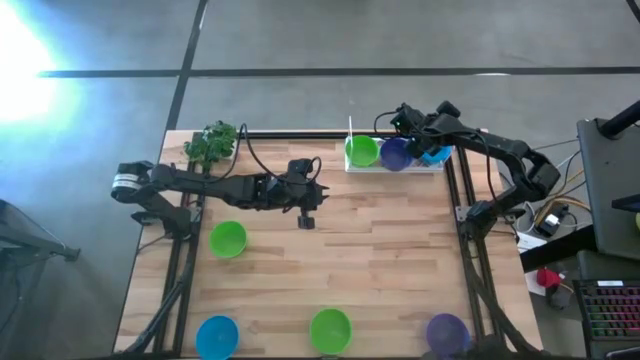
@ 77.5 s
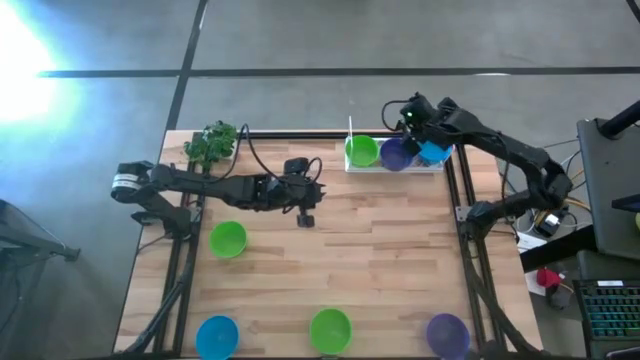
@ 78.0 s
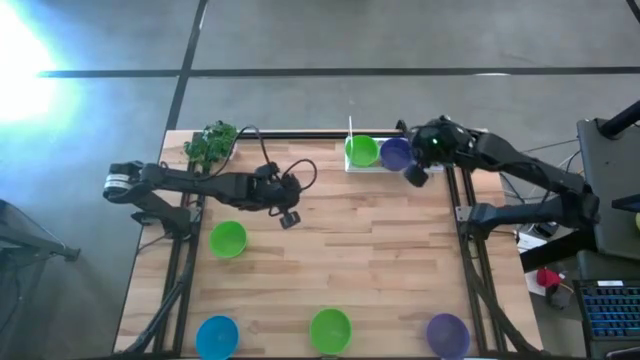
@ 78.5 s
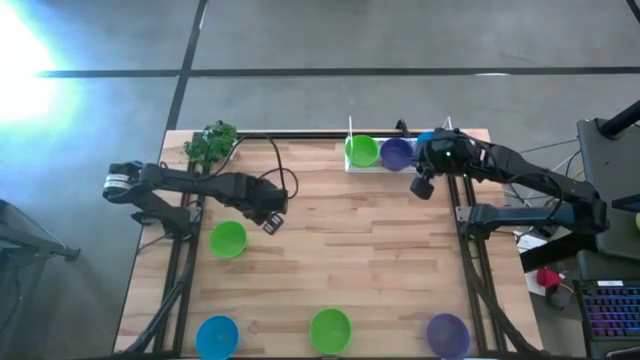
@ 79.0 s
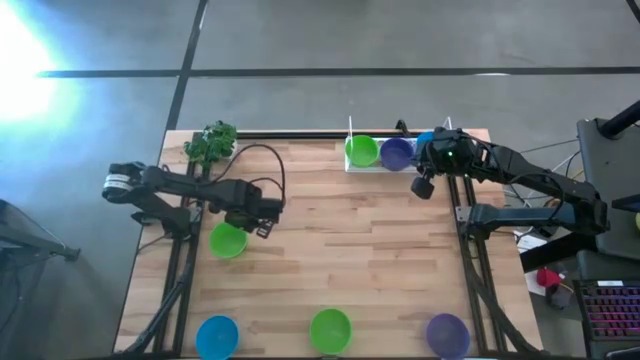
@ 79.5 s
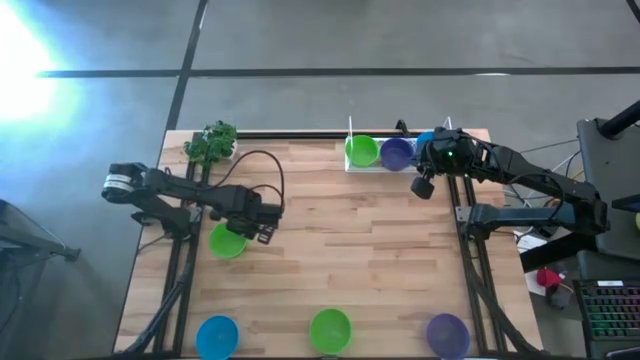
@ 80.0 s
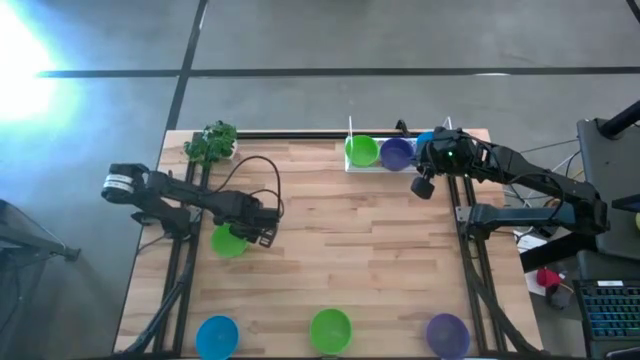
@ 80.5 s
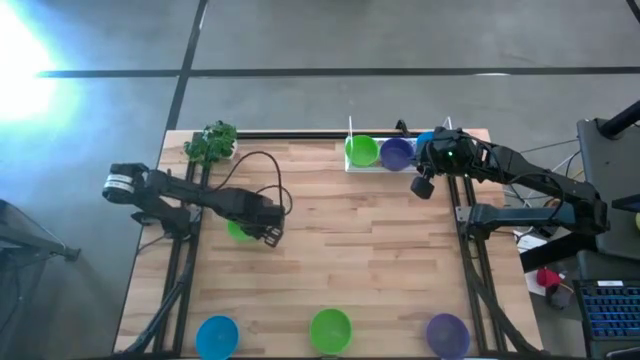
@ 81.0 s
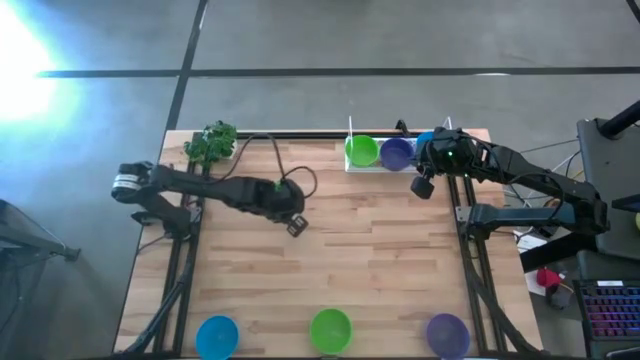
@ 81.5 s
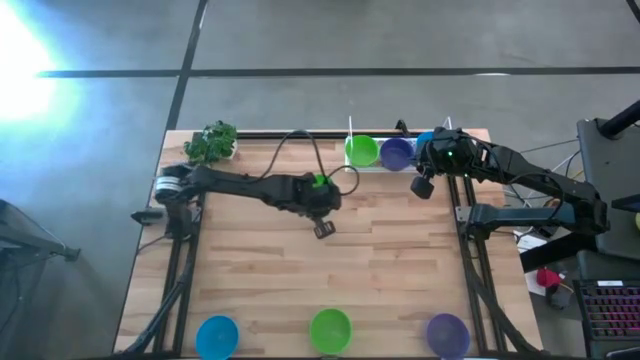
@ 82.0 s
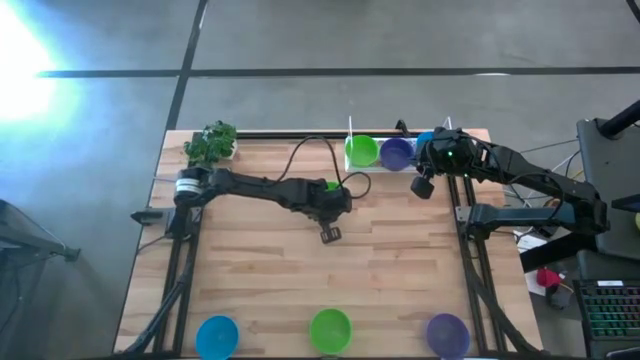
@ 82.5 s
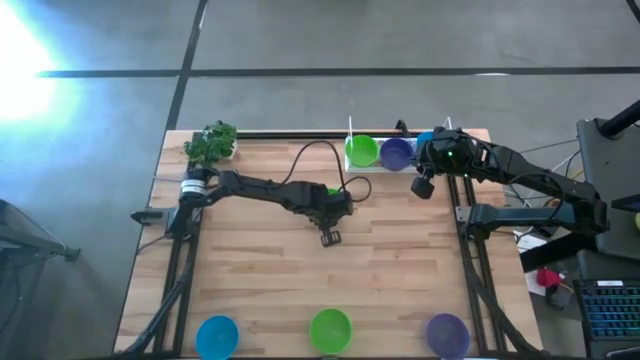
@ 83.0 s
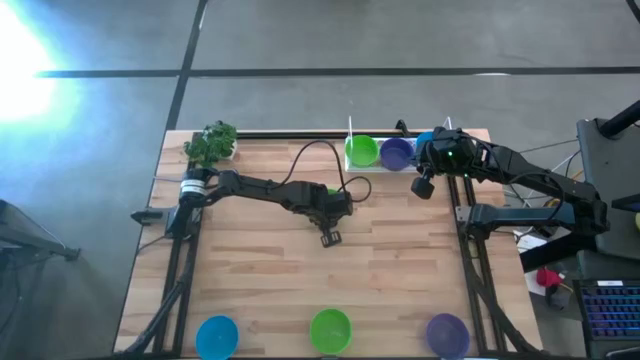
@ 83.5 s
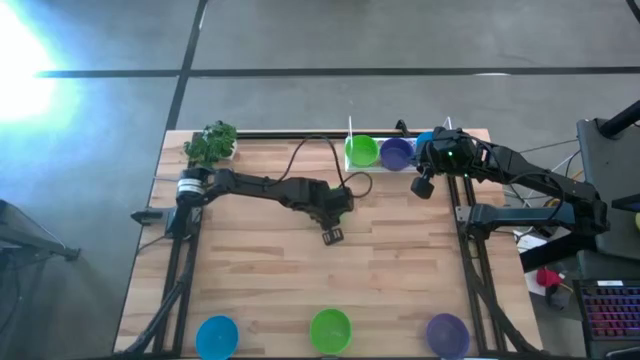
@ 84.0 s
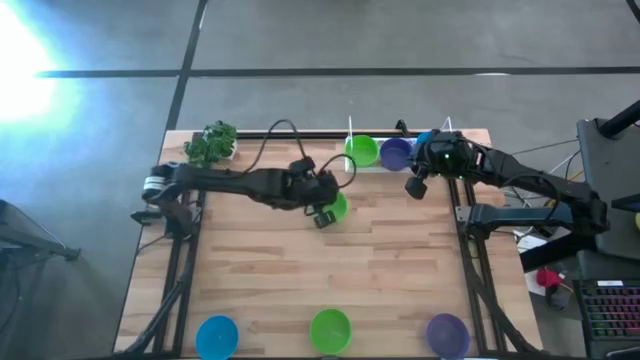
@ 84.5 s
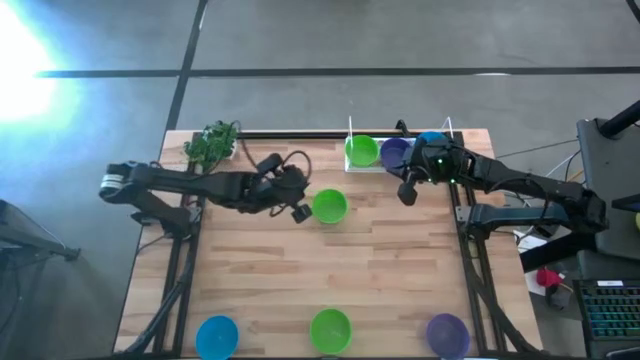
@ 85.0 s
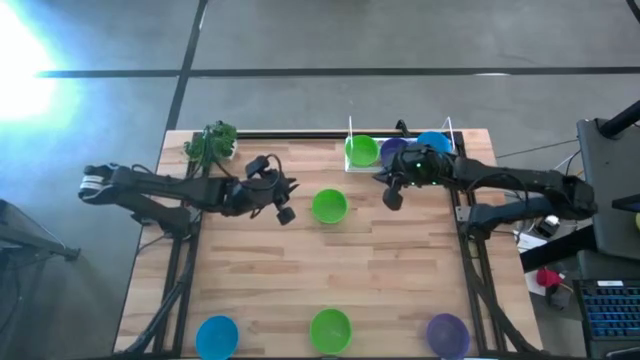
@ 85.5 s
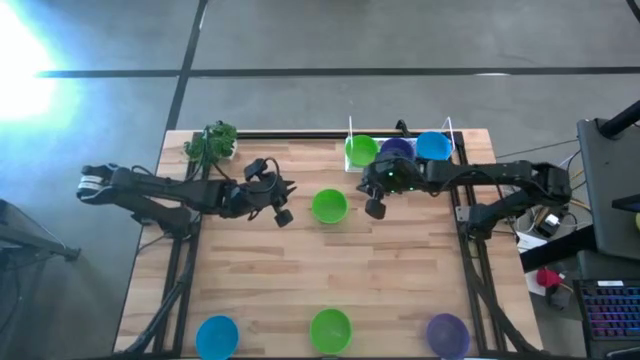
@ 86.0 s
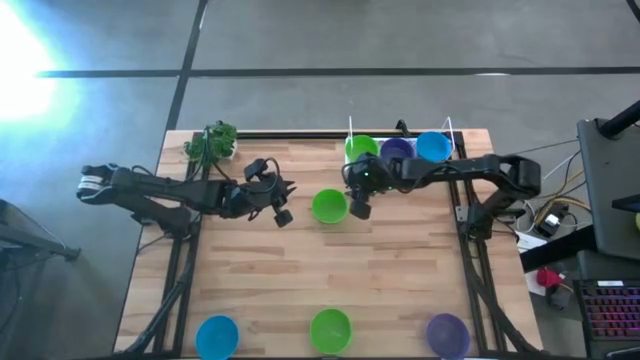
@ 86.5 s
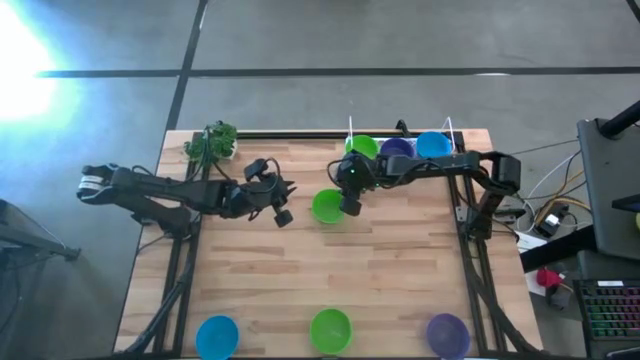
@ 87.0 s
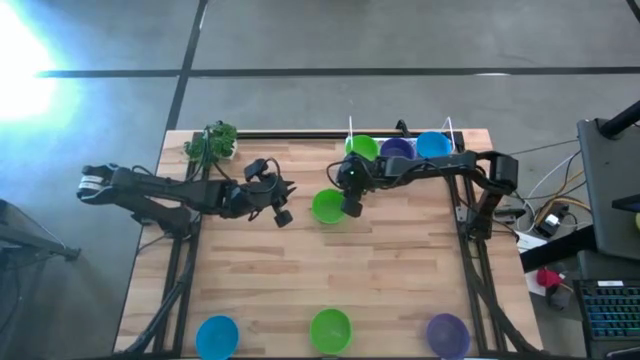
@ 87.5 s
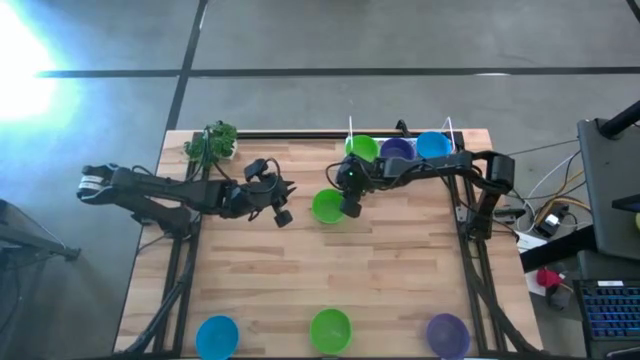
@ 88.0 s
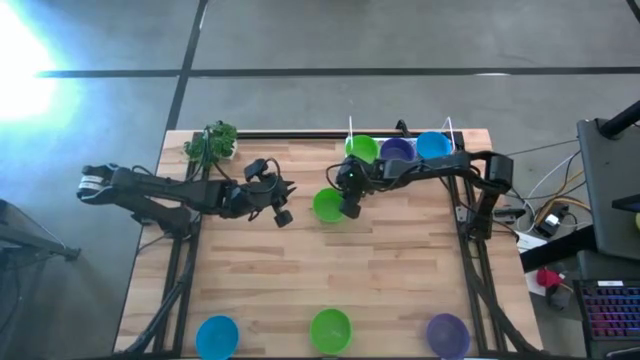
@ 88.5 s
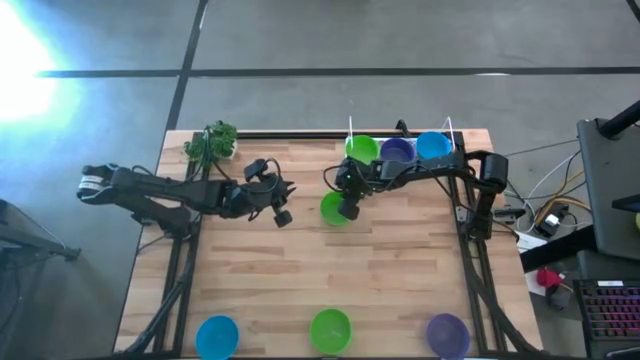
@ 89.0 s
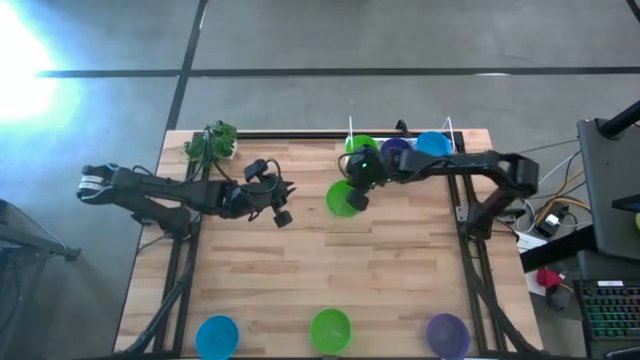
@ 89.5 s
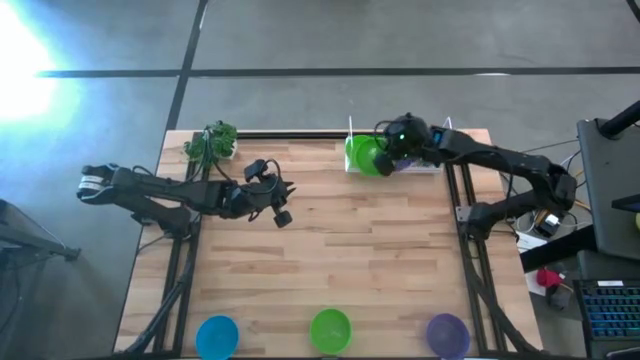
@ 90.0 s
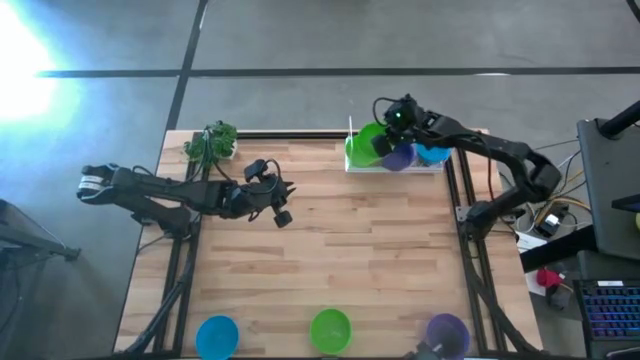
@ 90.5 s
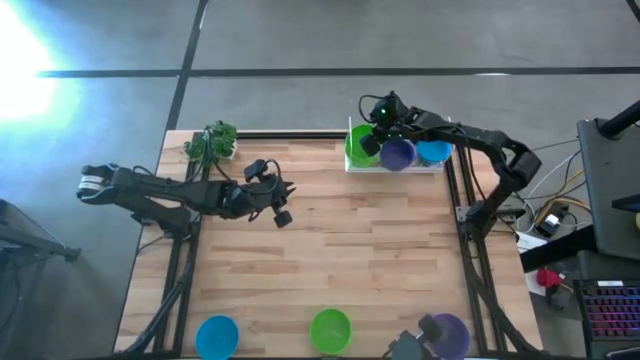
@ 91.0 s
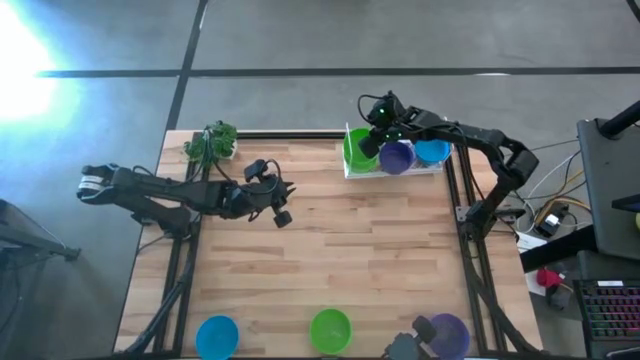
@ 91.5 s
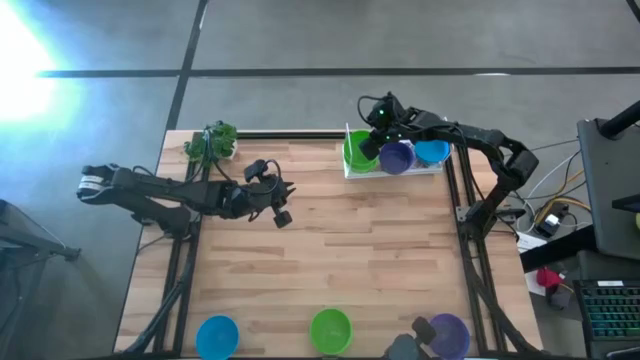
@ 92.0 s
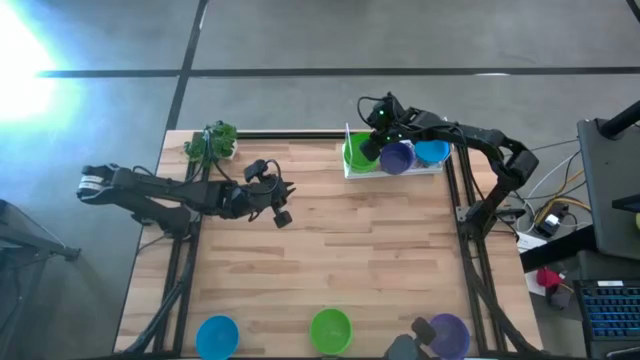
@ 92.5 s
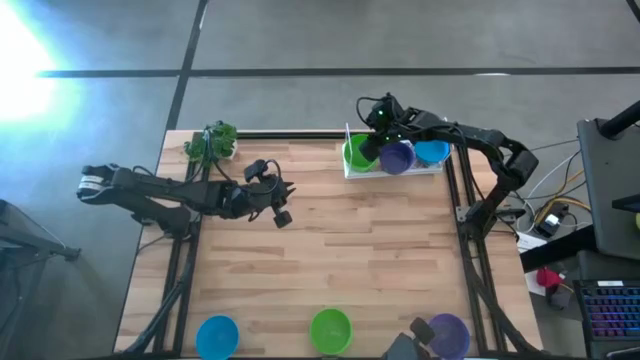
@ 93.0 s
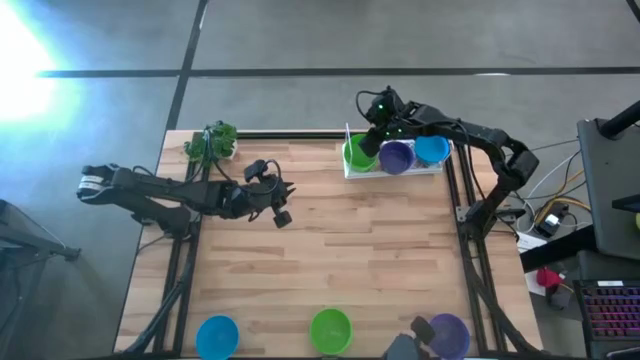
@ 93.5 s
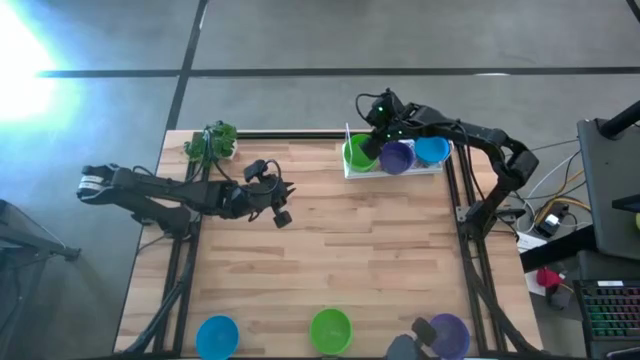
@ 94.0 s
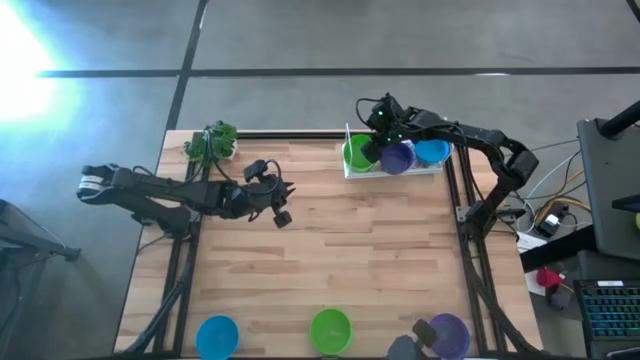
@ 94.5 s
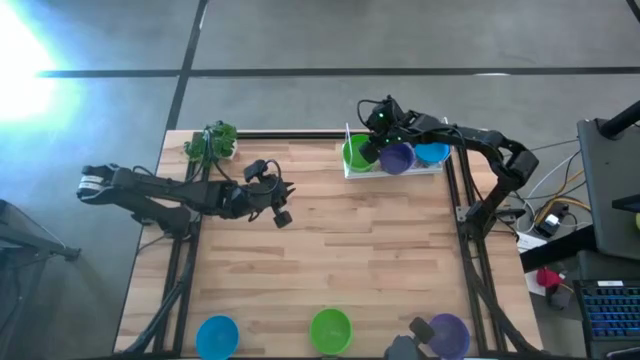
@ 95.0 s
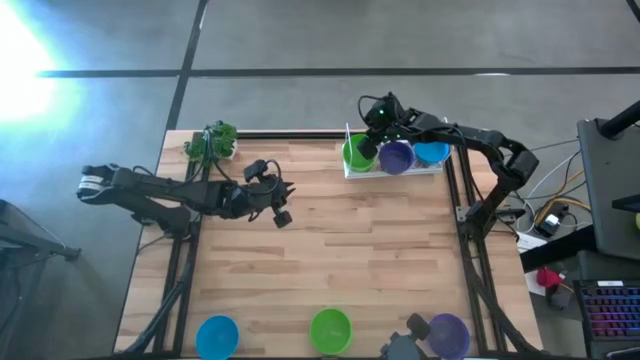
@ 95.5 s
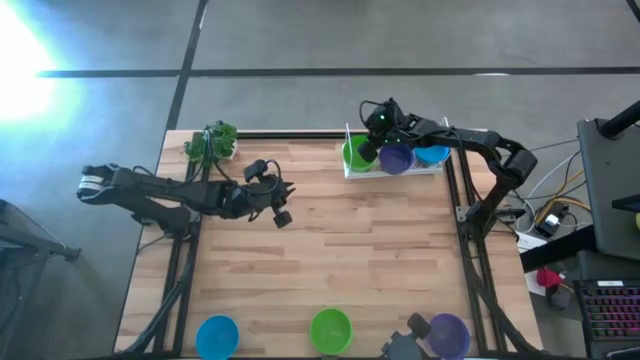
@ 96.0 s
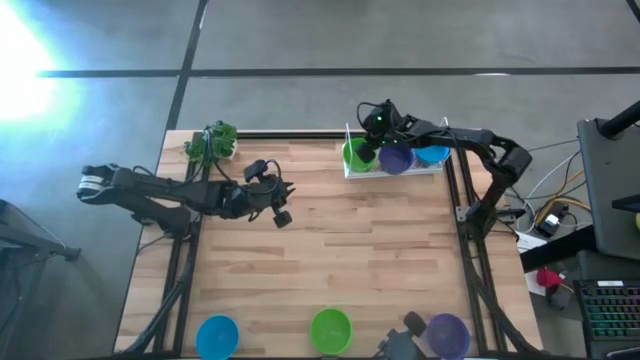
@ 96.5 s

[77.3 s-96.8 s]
Task: Pick & Place Mini bowls
Stack the top green bowl on top of the green bowl on the shelf

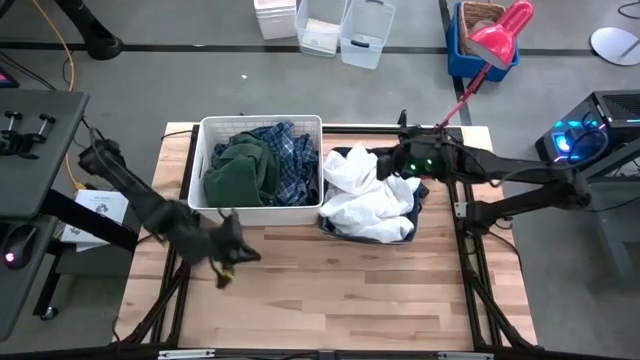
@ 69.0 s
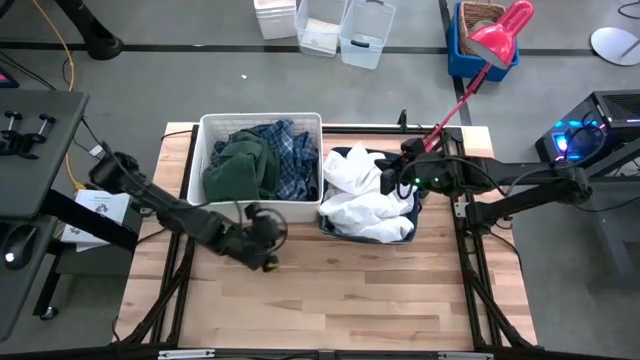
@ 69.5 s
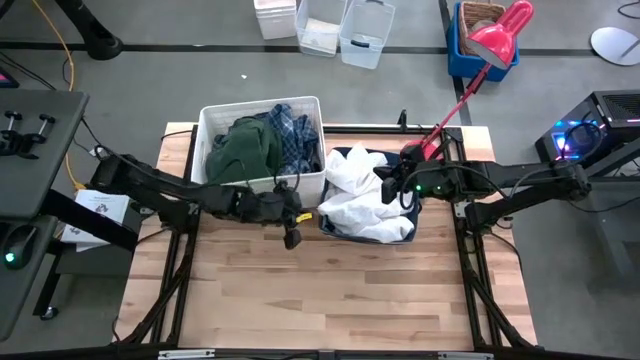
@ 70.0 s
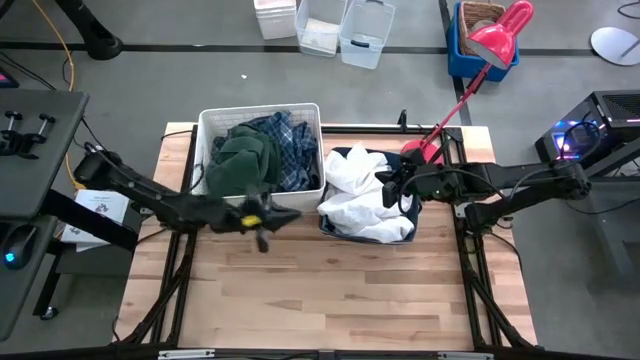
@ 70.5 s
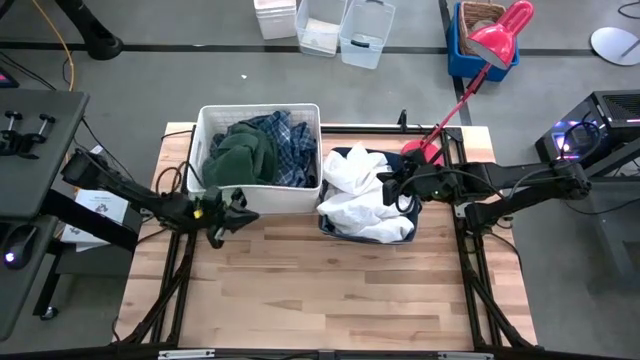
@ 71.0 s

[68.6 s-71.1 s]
Task: Sort clothes
Adjust the white laundry bin
